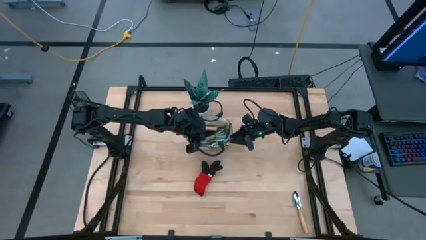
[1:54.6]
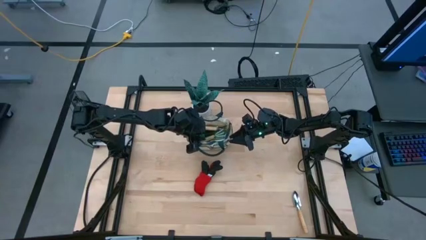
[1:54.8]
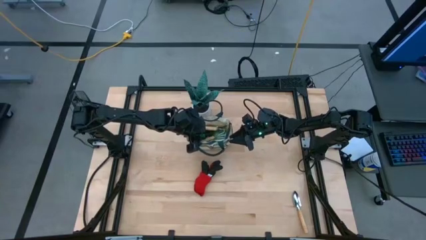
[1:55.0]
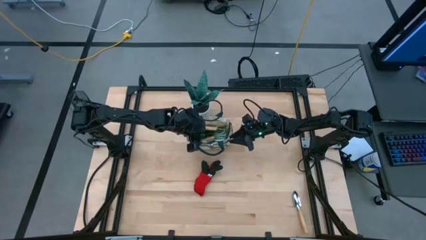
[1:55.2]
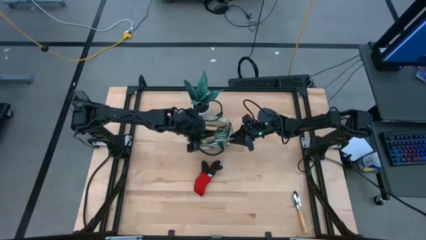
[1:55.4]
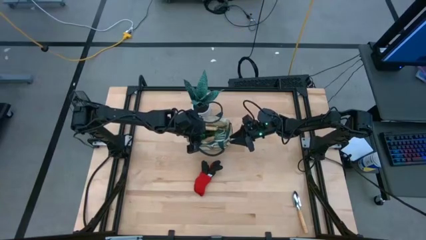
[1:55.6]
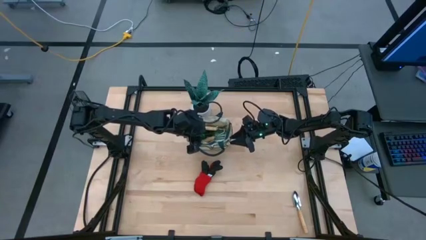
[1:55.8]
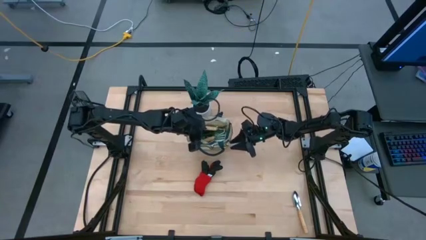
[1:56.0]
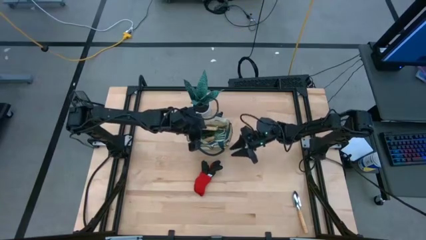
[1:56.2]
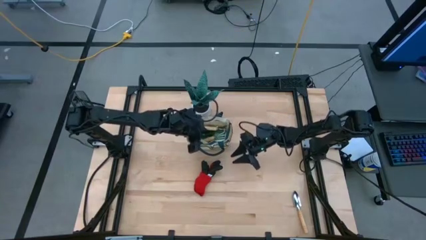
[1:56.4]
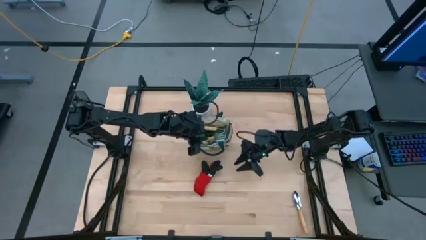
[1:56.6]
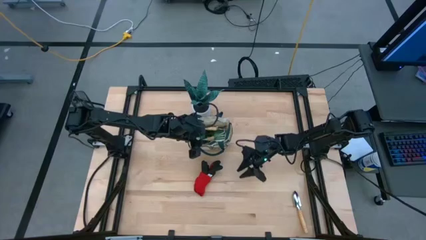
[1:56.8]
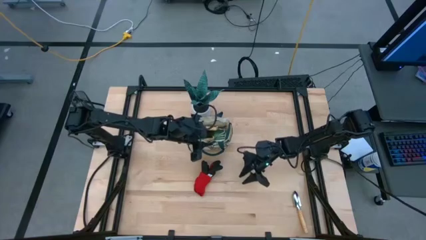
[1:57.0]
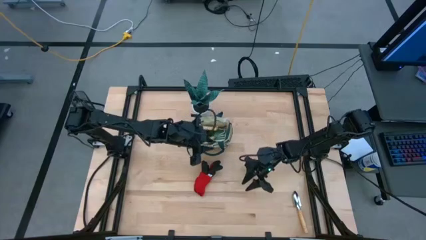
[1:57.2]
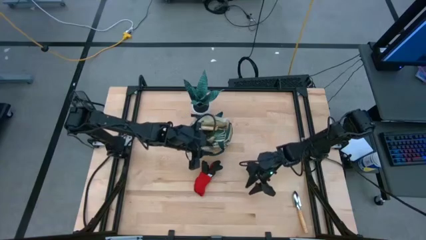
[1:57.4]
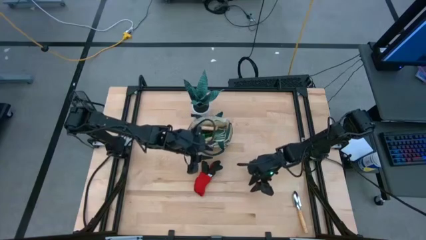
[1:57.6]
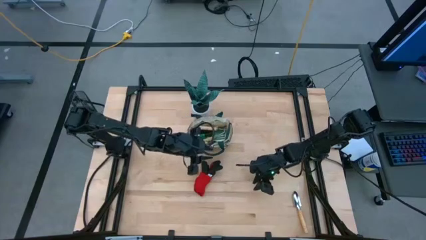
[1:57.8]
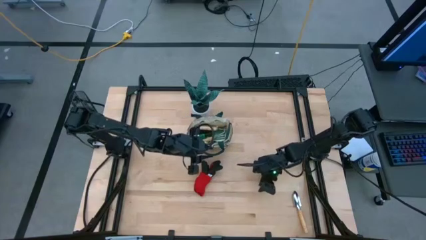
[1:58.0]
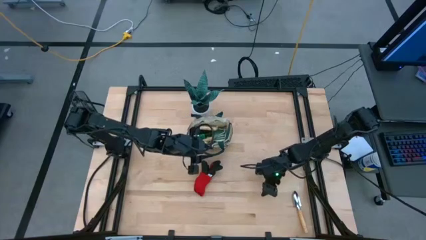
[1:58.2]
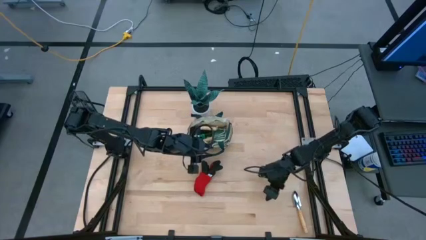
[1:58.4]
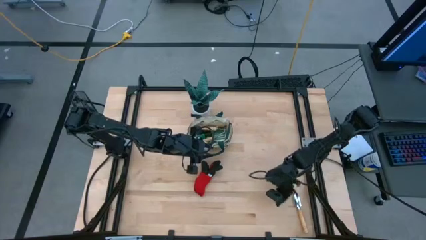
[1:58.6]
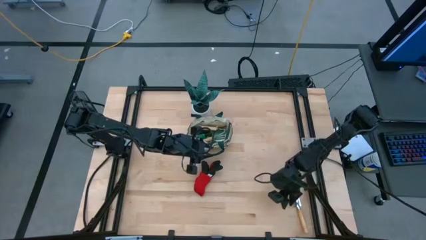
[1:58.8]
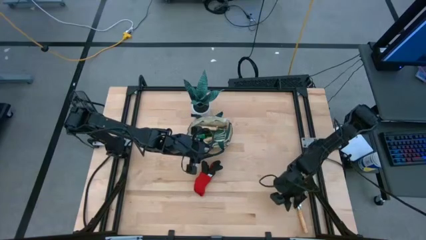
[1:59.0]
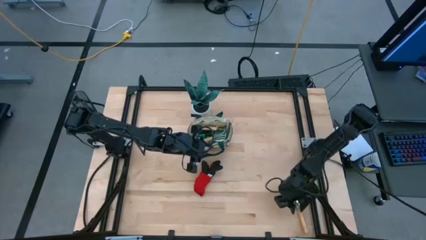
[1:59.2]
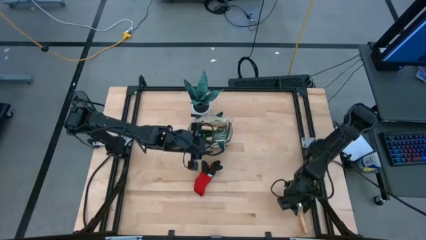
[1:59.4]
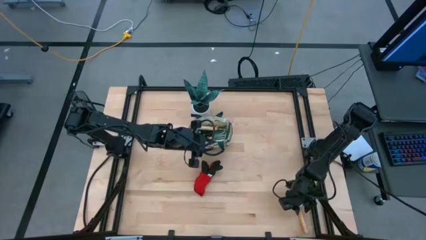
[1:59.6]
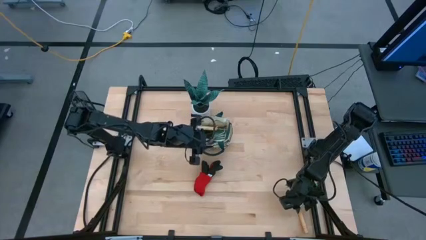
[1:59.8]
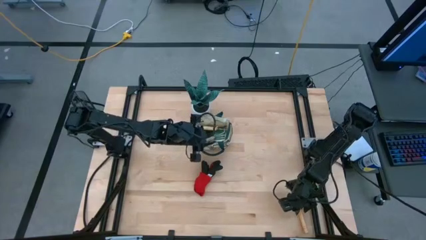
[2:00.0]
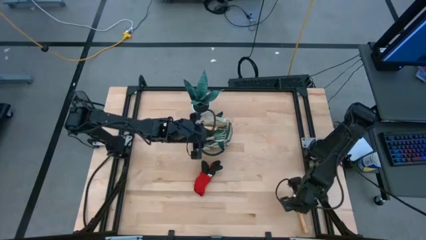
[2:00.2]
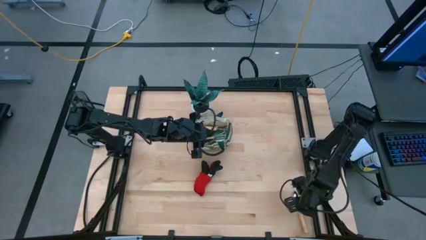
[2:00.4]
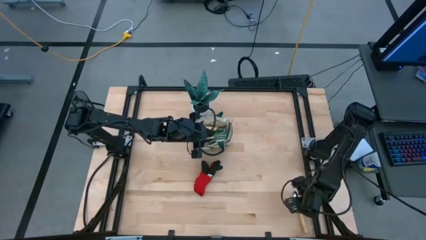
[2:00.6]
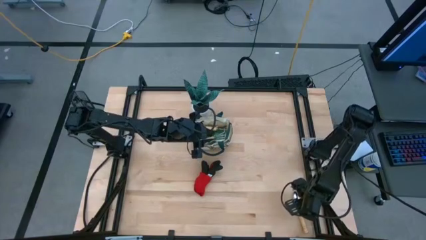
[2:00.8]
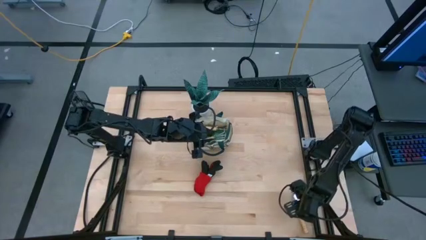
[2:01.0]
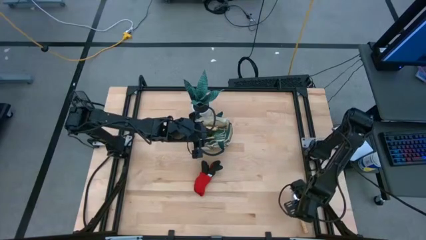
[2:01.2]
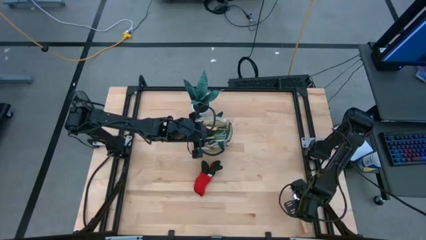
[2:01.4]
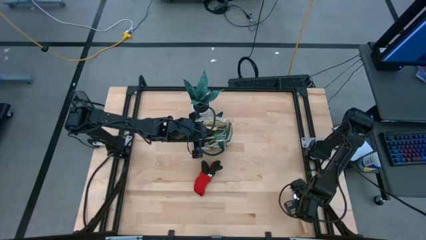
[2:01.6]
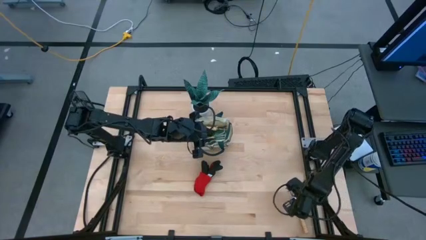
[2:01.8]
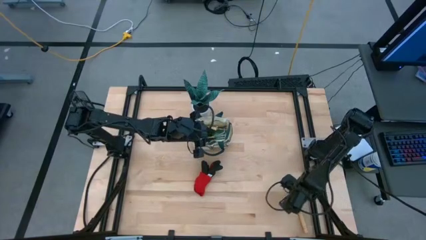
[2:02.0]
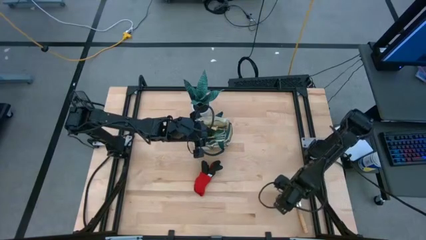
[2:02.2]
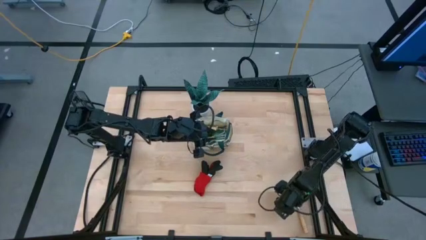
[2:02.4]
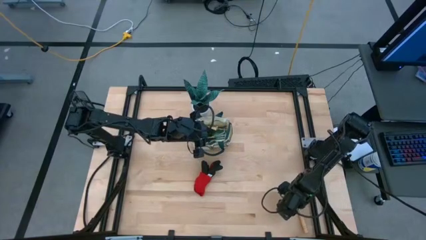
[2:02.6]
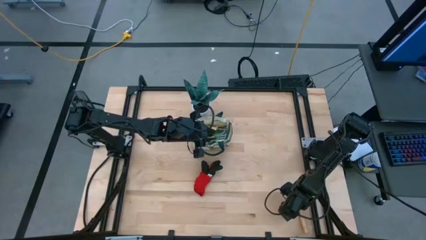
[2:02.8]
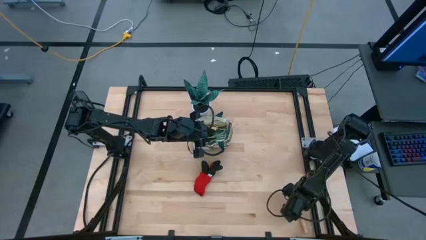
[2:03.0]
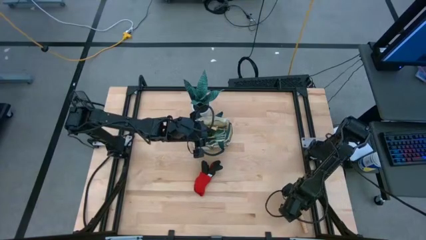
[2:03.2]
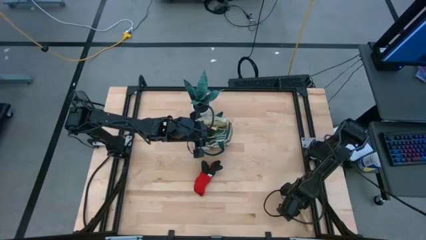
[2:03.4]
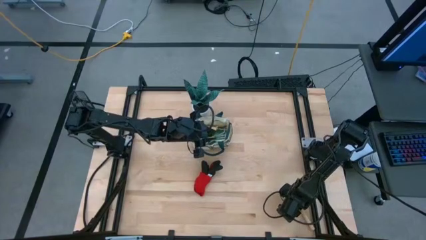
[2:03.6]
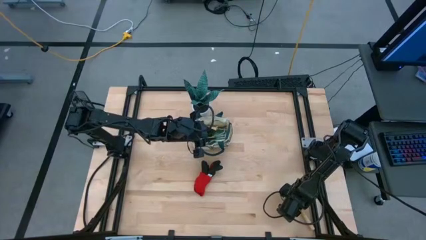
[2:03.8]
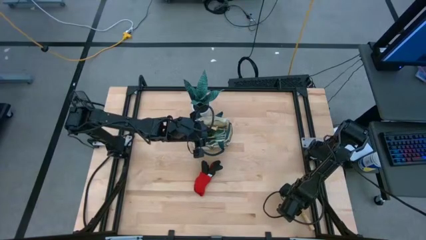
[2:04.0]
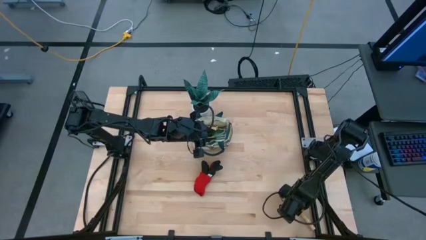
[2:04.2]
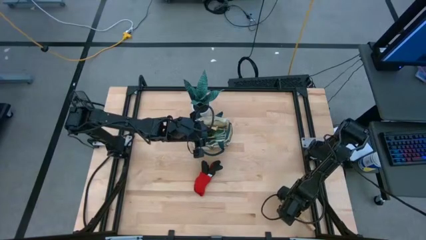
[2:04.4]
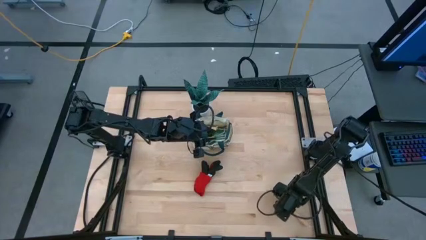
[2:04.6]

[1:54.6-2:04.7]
Task: Pick & Place Garden tools in Gardening bag
Put the brown trowel into the gardening bag

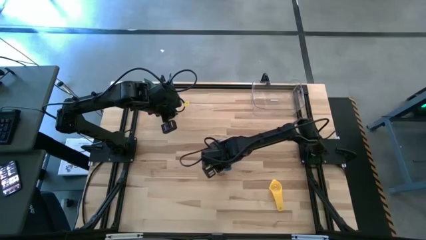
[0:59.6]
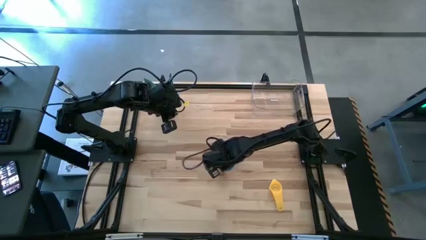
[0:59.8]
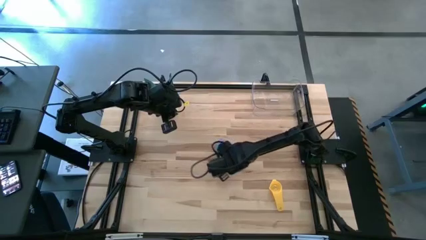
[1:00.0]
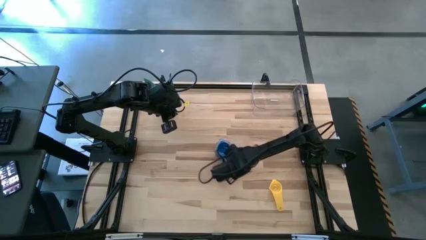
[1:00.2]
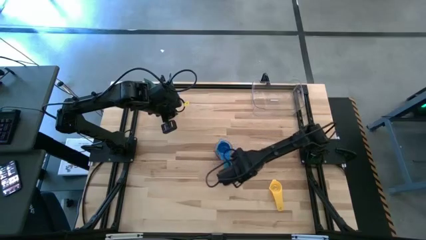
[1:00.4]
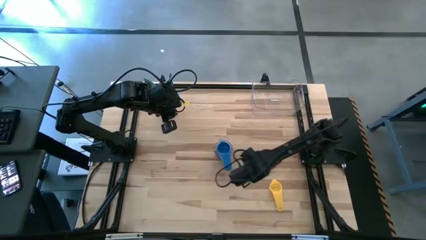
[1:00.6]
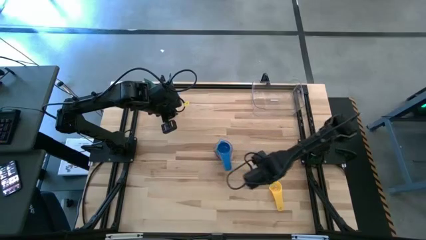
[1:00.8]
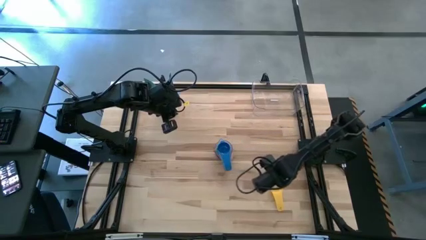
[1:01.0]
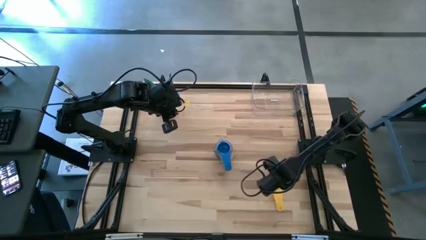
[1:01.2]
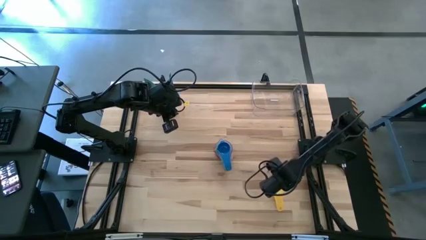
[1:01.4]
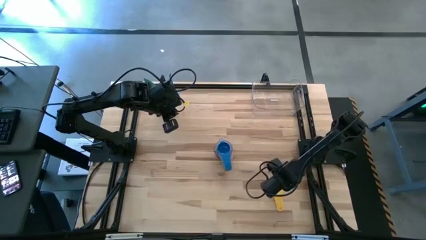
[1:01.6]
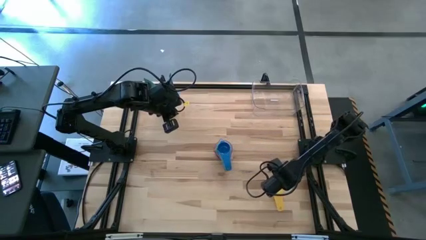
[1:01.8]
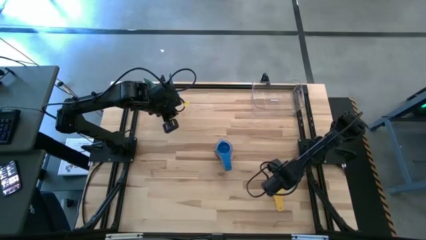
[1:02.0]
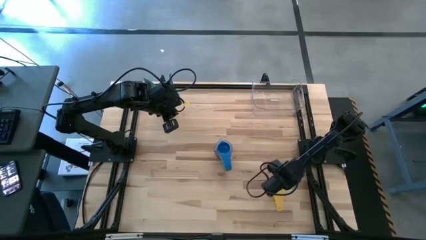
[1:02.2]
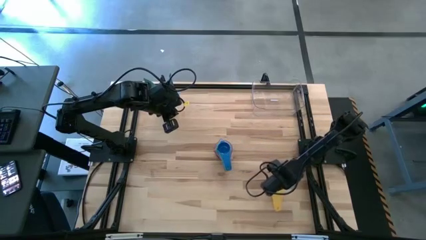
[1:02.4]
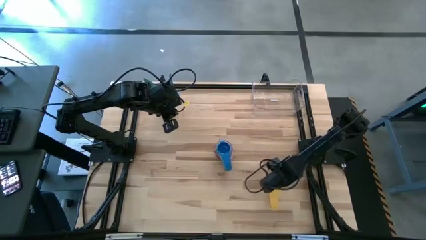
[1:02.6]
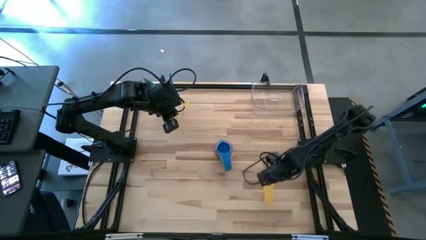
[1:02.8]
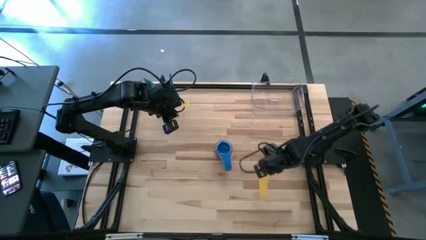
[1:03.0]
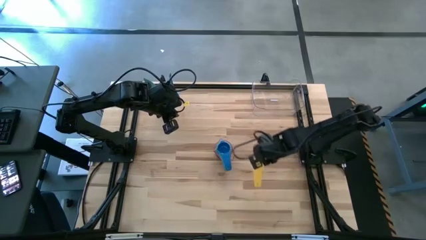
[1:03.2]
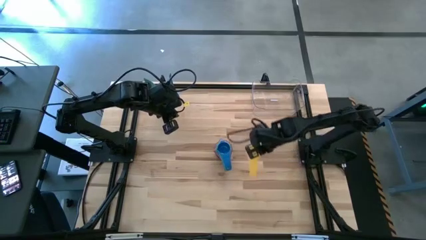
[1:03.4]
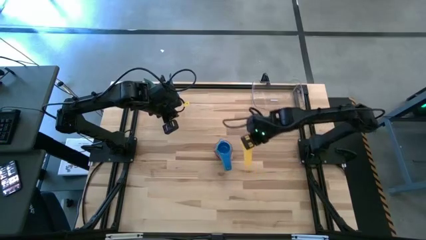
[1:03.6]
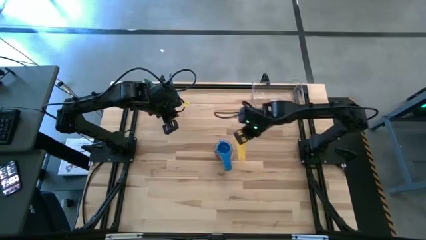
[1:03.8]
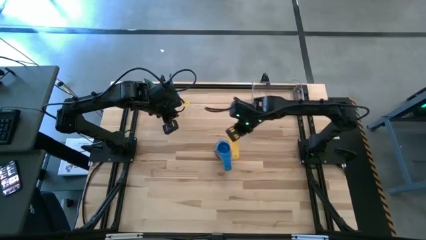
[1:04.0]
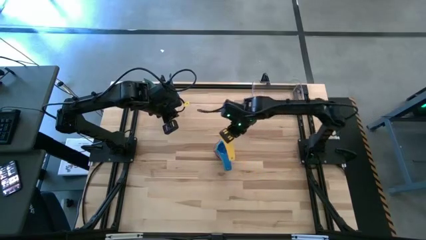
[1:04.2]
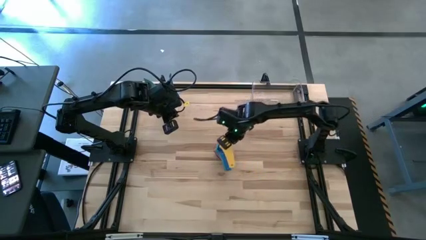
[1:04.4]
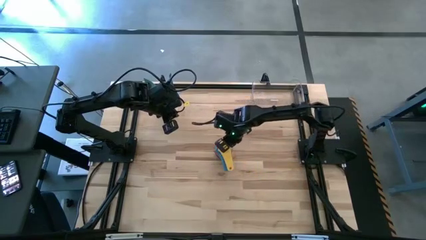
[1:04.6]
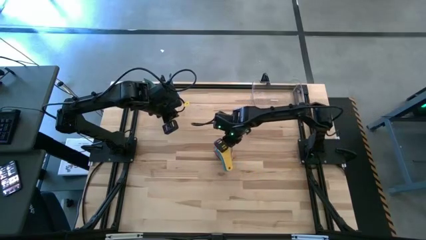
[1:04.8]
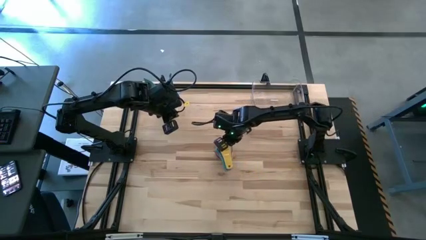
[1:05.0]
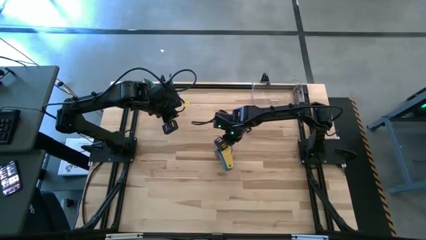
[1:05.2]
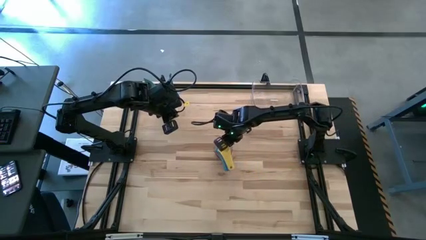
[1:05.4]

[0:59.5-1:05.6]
Task: Nest measuring cups in basket
Stack the yellow measuring cup on top of the blue measuring cup
